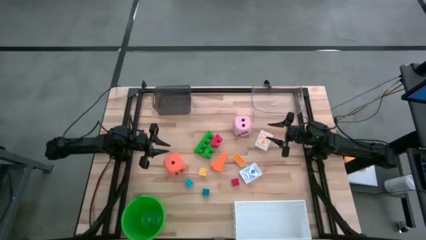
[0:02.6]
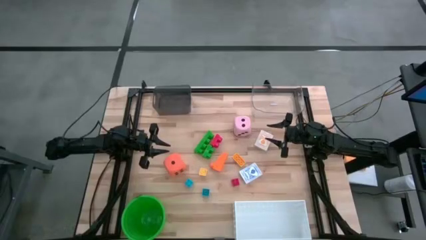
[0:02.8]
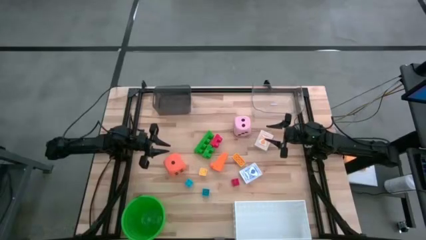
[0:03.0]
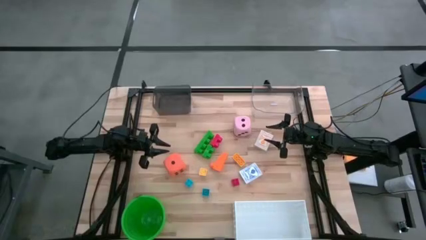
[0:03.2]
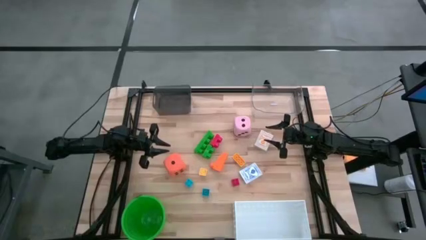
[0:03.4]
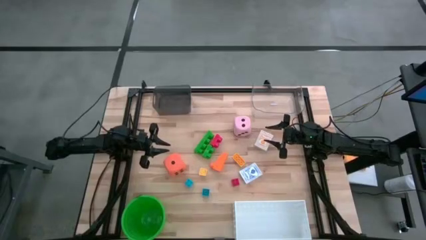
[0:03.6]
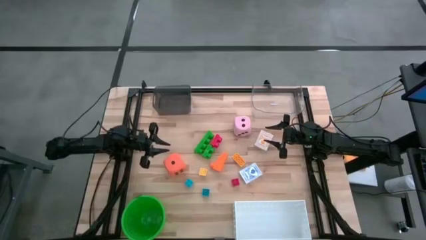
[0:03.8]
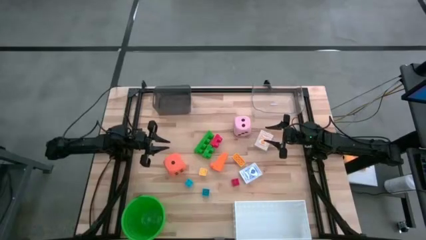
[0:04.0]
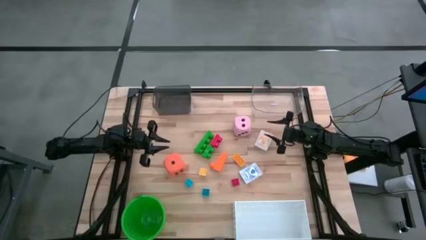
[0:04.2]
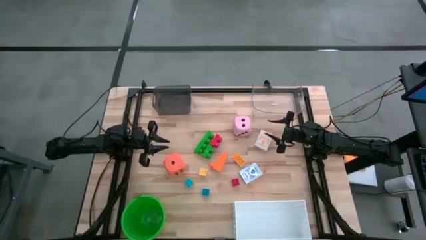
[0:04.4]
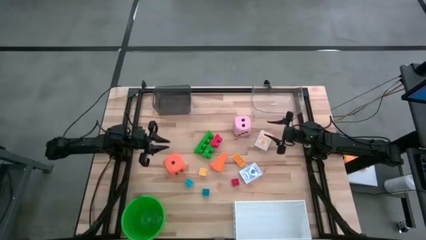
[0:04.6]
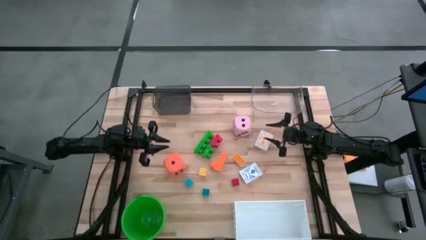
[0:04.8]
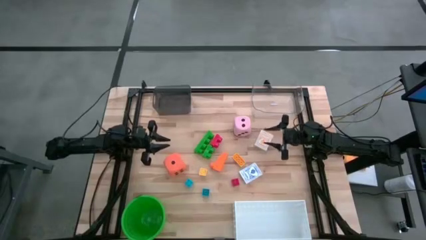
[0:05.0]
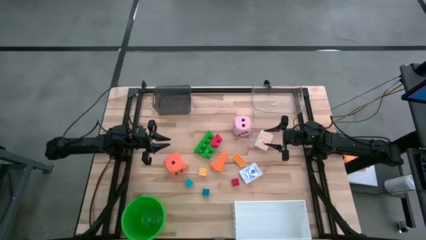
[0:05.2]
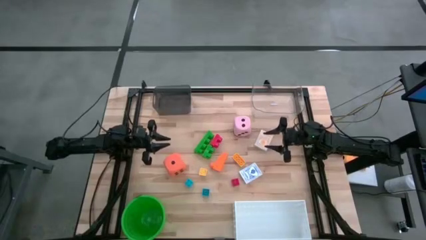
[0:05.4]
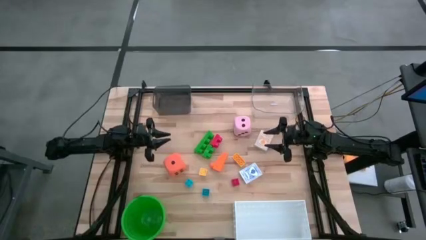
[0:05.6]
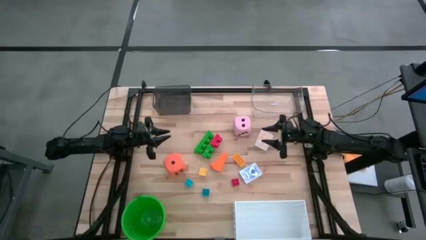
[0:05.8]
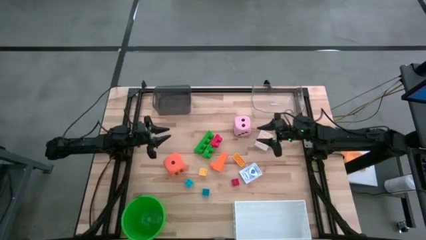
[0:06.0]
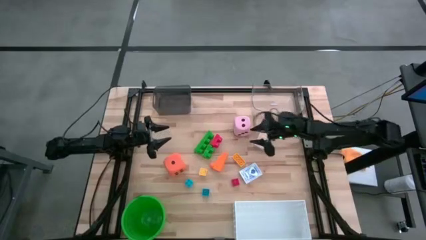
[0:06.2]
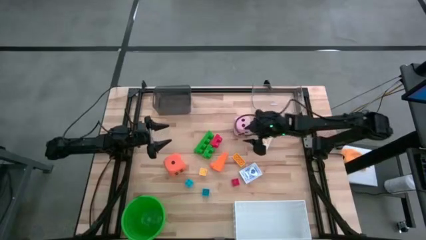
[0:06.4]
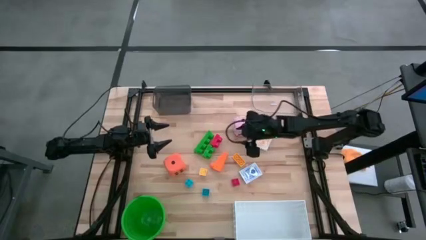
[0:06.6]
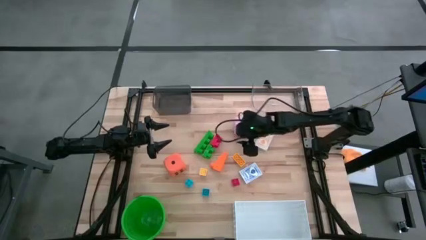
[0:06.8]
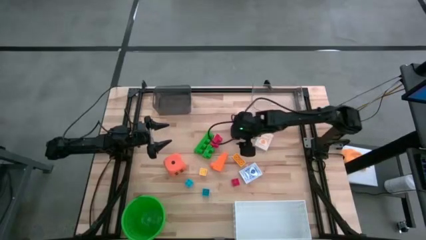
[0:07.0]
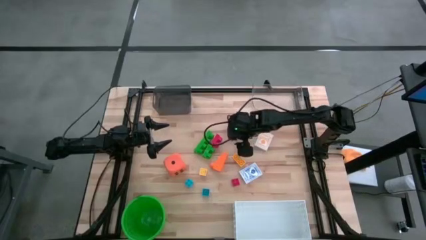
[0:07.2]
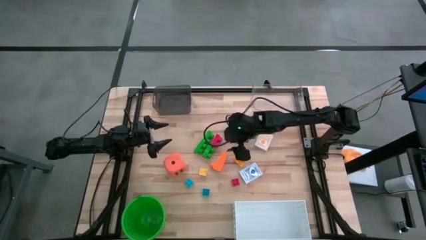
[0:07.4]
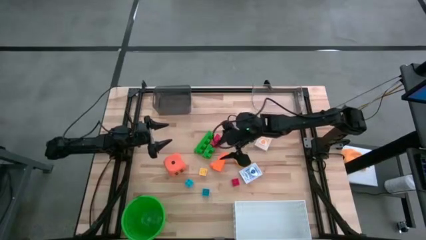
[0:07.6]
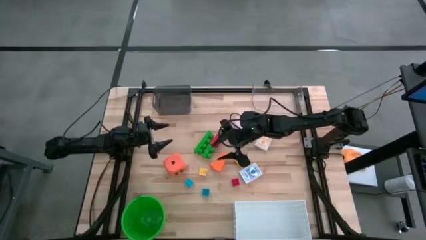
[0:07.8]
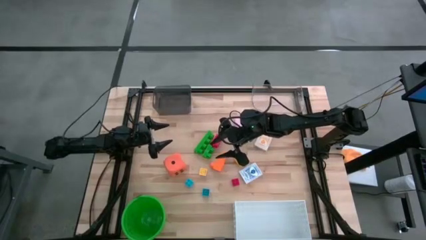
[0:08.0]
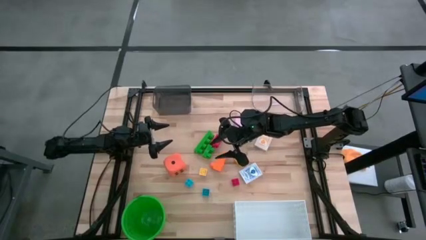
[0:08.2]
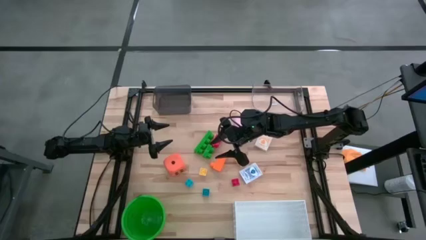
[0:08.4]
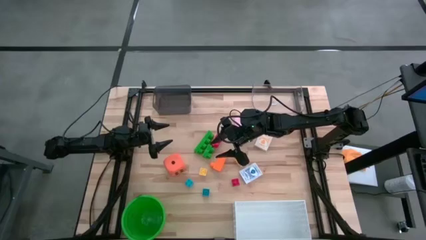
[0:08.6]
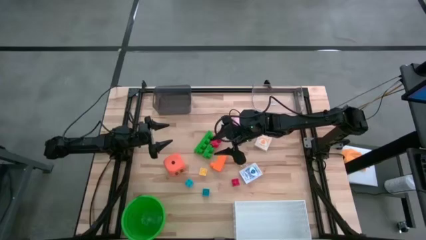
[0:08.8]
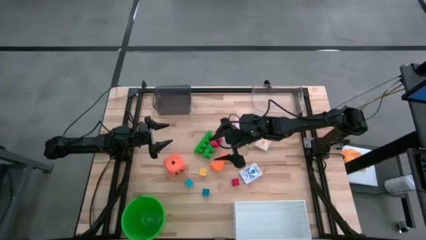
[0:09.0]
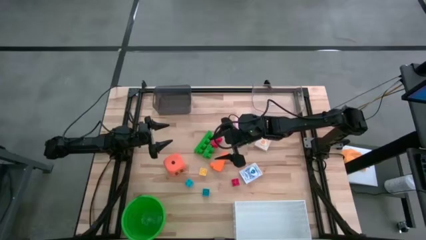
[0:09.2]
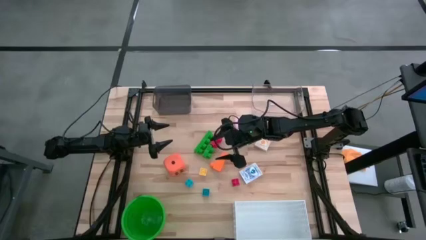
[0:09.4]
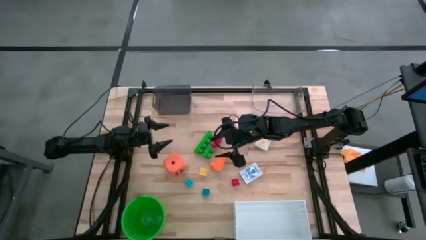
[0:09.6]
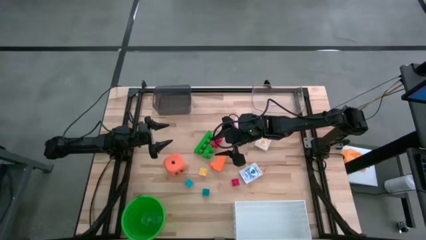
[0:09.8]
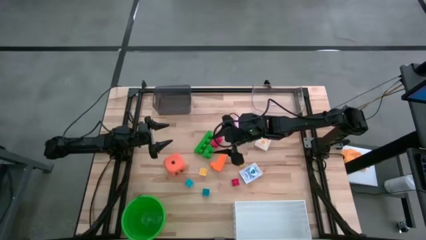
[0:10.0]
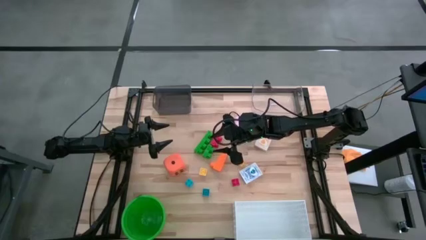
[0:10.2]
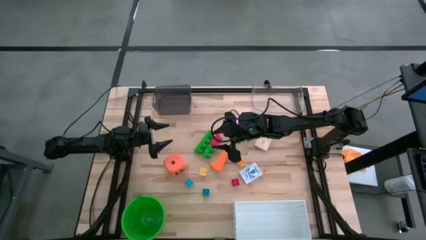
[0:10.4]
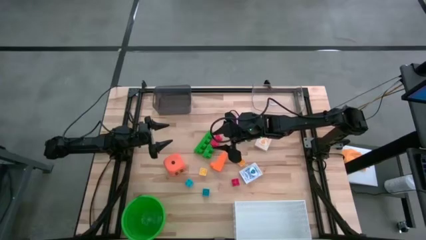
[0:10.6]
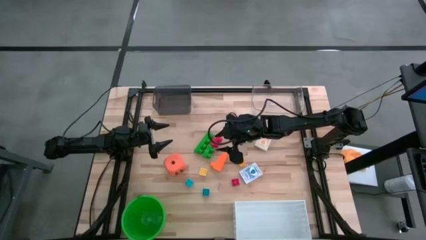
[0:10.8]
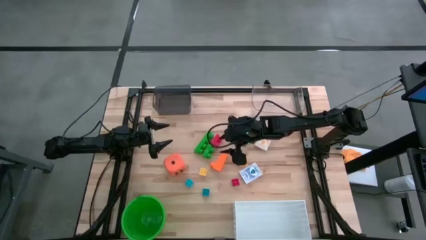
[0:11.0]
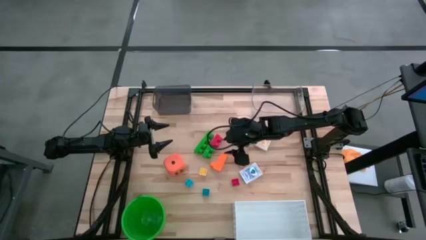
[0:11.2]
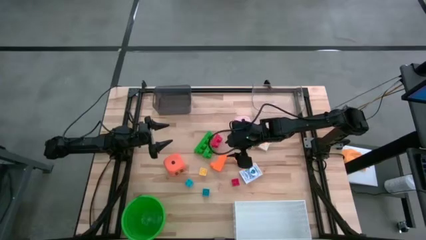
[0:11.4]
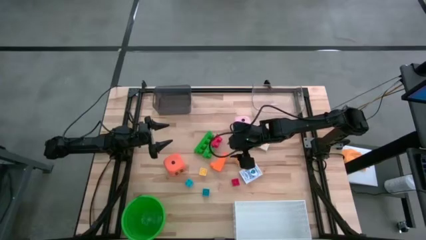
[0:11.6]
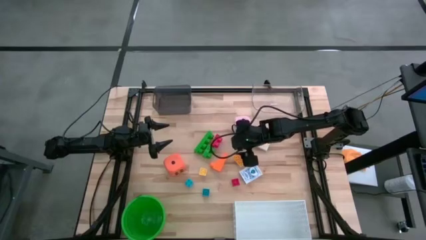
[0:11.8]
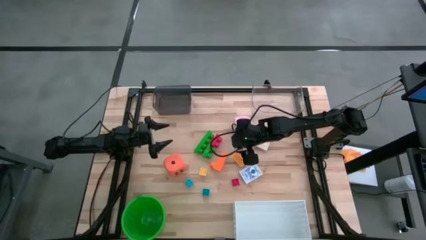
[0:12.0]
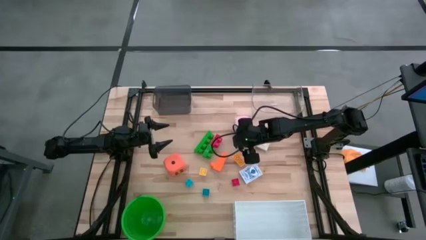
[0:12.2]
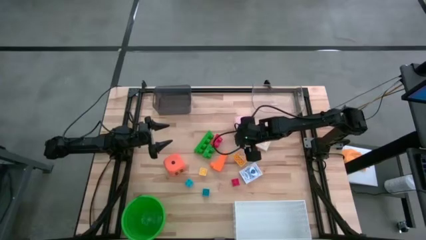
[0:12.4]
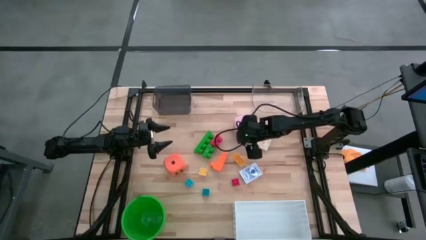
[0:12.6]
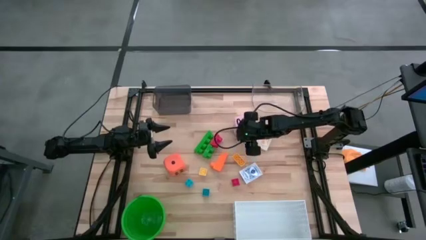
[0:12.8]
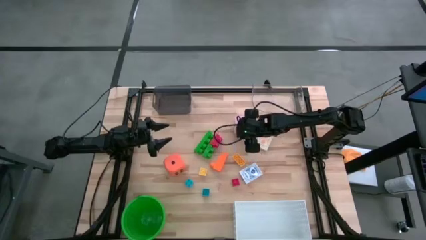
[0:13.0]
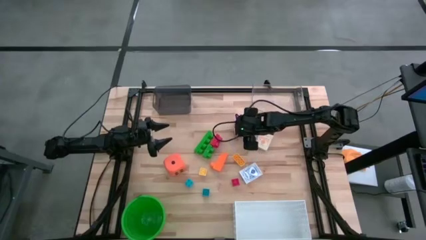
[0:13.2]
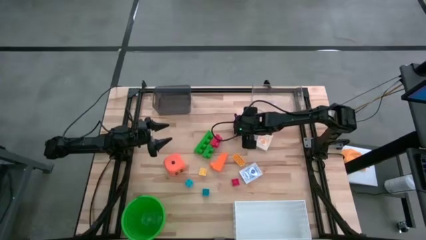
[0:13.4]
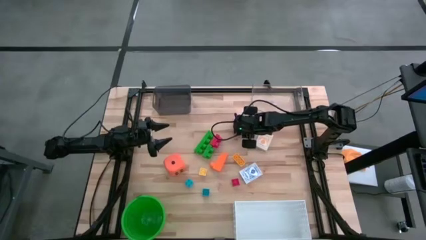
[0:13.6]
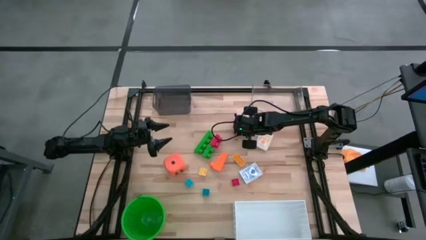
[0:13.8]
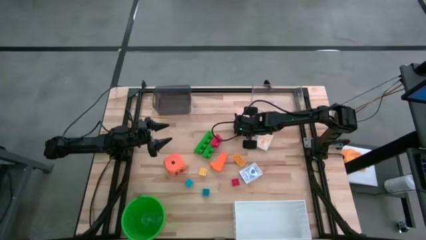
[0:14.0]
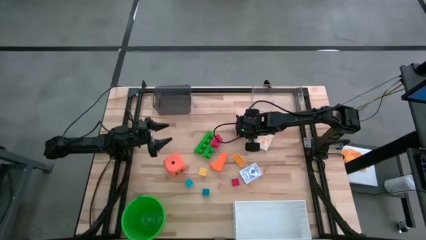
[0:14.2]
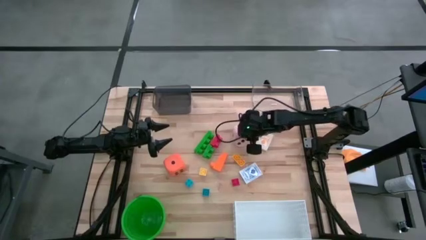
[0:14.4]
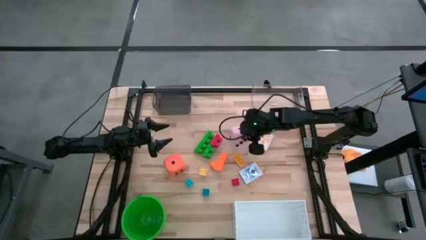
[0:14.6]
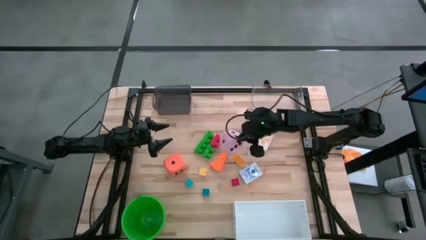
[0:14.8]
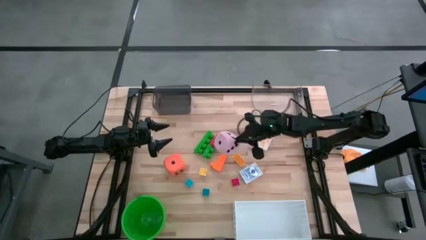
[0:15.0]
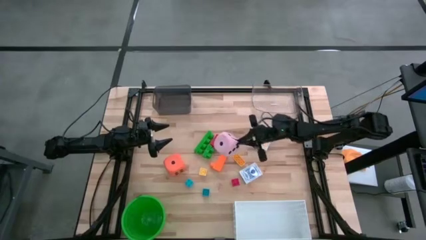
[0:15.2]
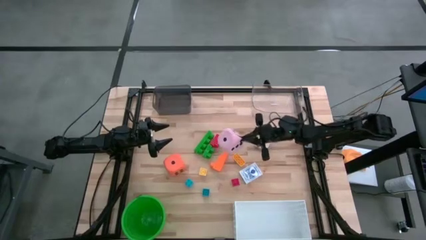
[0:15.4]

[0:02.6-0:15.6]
Task: Pick & Place Toys
Put the pink dice into the transparent bin

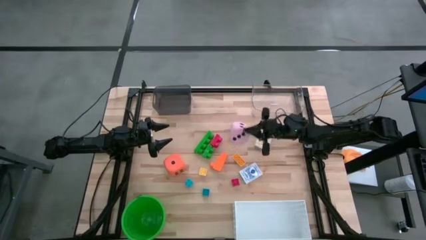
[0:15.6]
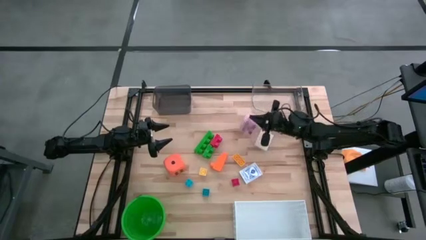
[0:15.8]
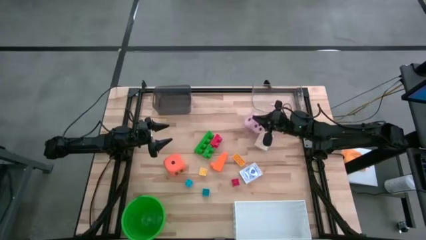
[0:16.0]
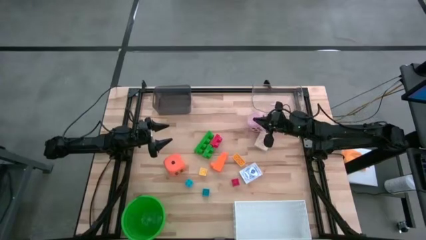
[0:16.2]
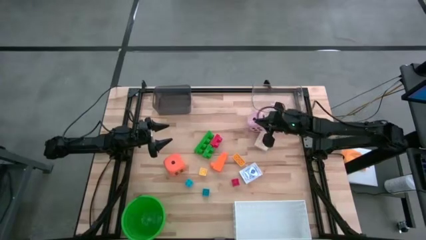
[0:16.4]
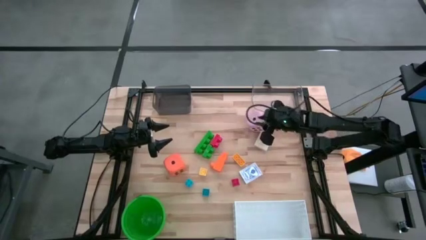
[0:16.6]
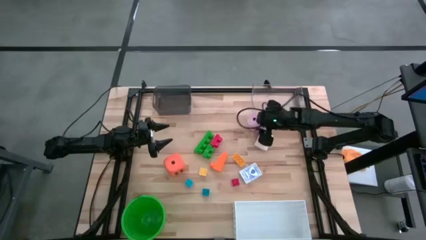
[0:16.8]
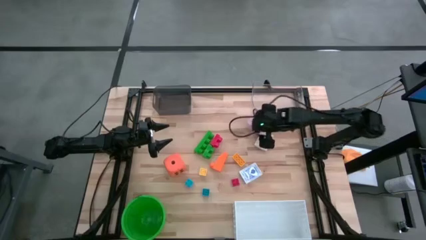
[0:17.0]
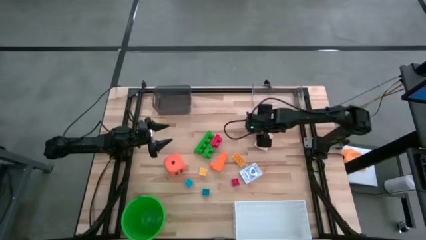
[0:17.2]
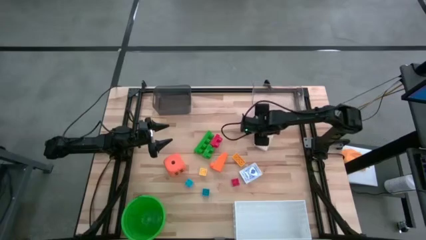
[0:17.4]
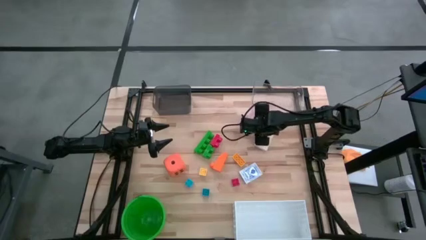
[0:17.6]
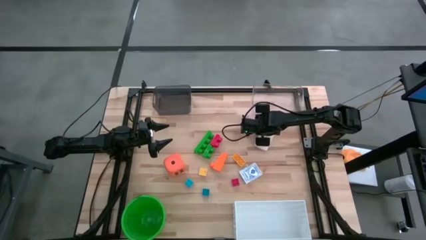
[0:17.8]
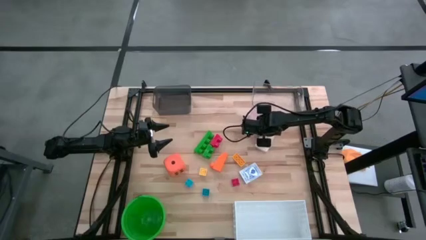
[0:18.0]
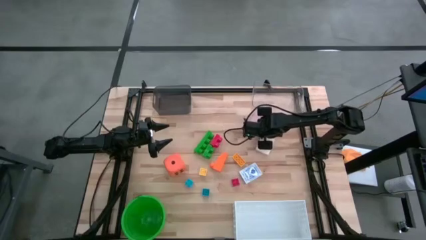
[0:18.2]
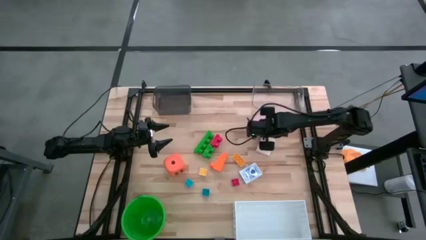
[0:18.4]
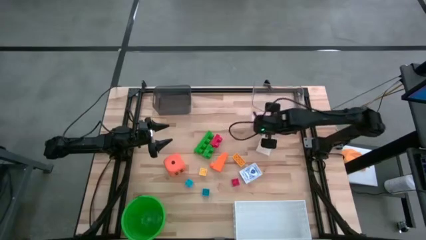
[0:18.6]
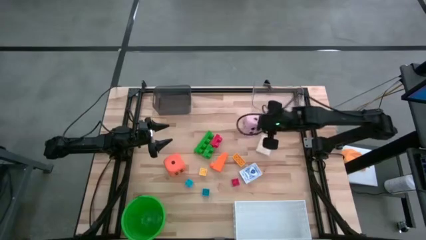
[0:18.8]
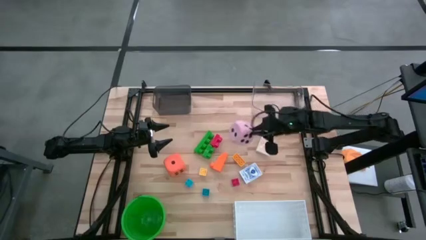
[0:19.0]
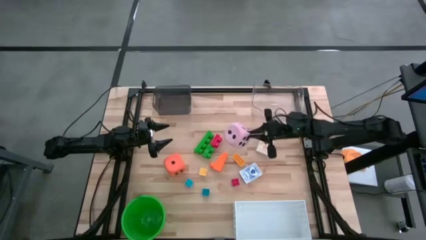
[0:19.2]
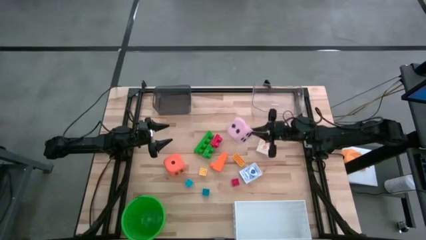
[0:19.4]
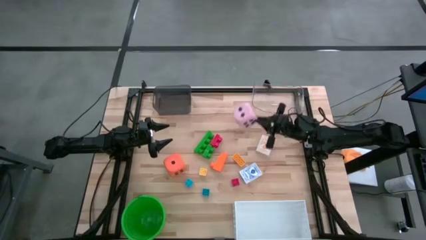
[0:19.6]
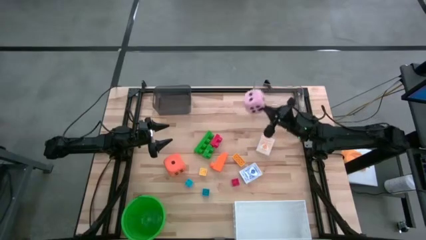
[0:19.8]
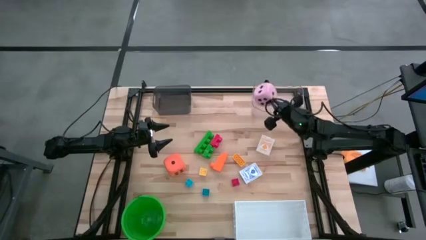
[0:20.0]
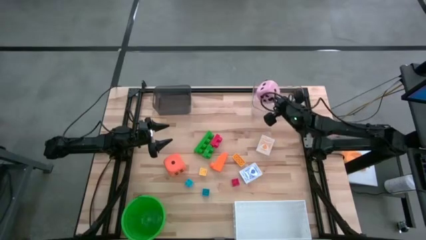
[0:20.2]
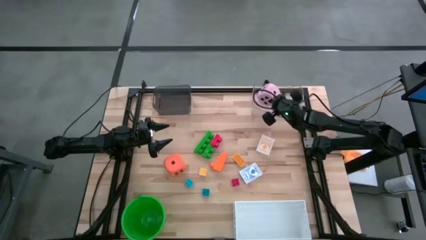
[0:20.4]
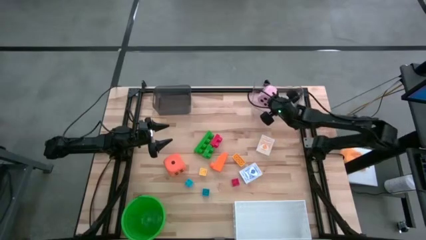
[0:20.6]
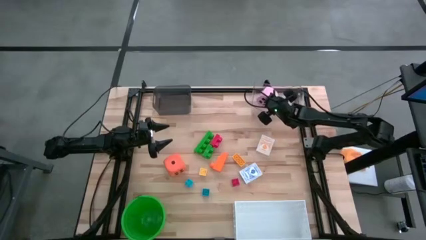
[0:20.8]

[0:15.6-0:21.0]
Put the pink dice into the transparent bin
